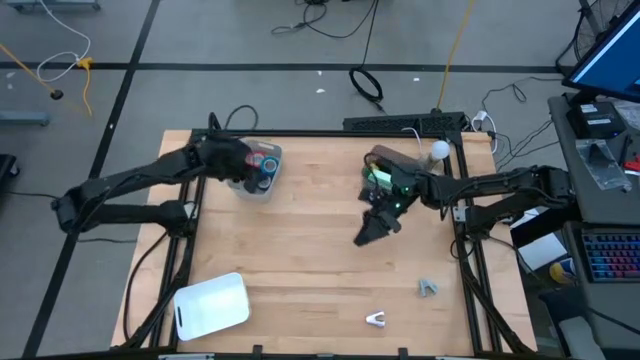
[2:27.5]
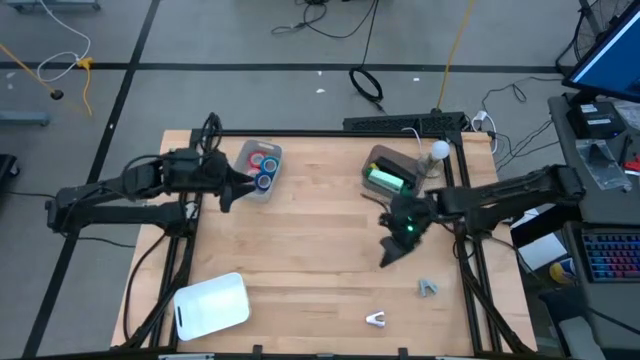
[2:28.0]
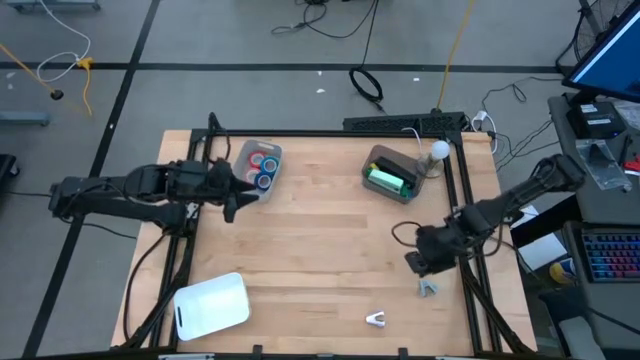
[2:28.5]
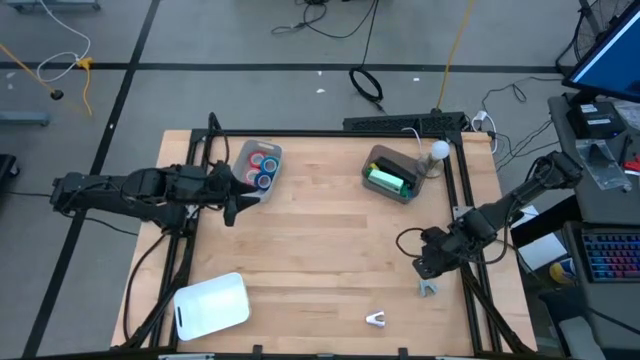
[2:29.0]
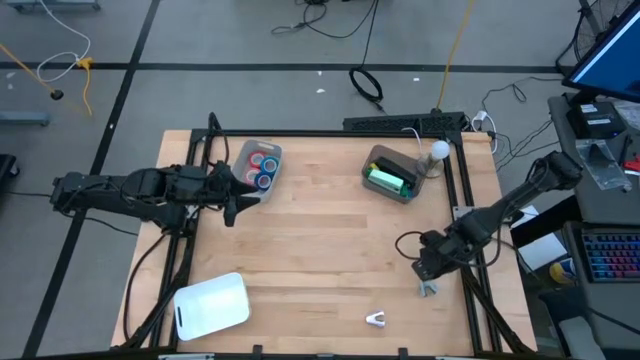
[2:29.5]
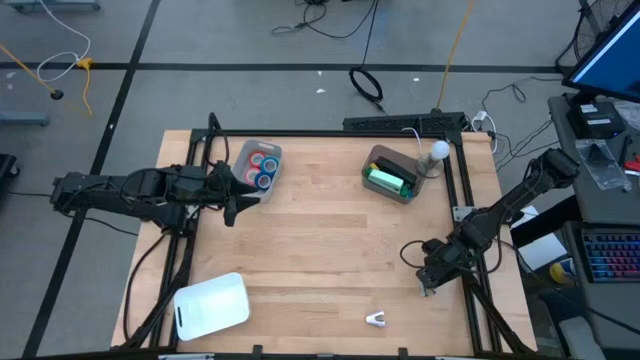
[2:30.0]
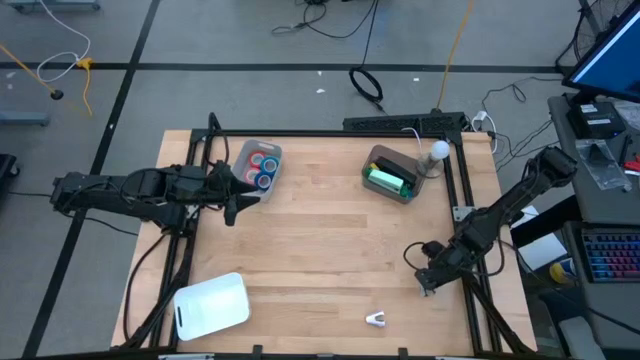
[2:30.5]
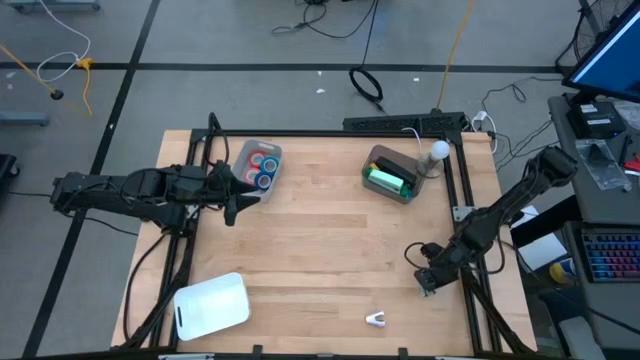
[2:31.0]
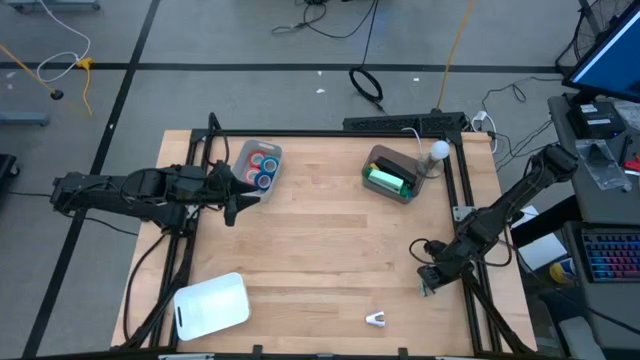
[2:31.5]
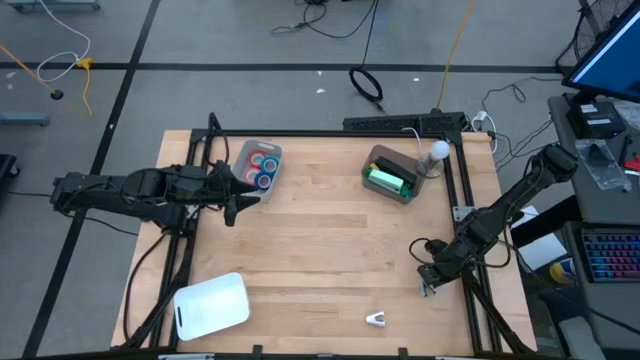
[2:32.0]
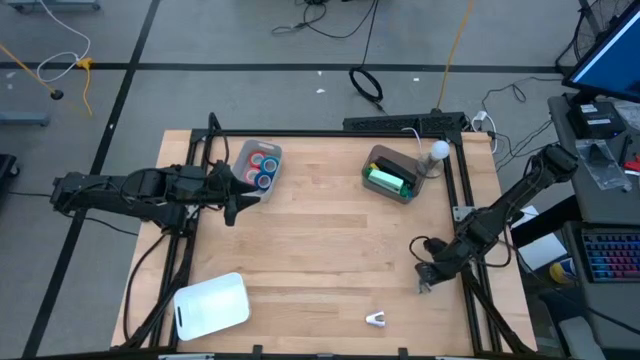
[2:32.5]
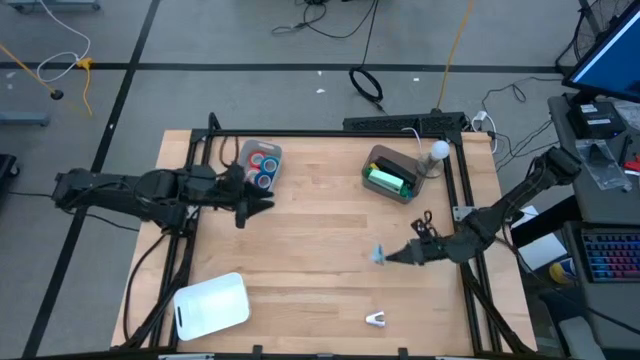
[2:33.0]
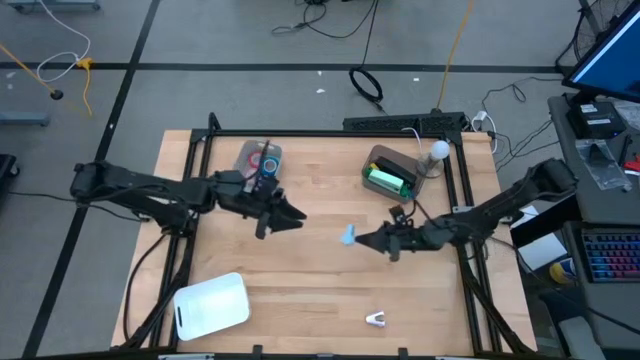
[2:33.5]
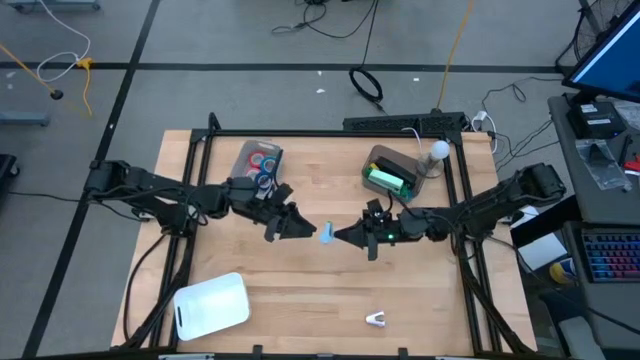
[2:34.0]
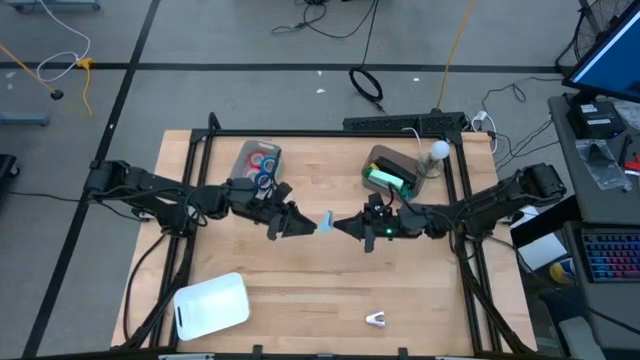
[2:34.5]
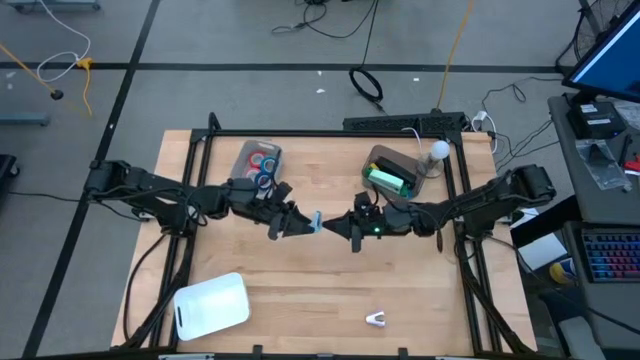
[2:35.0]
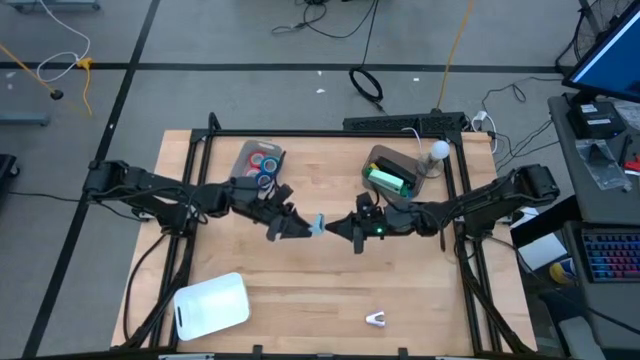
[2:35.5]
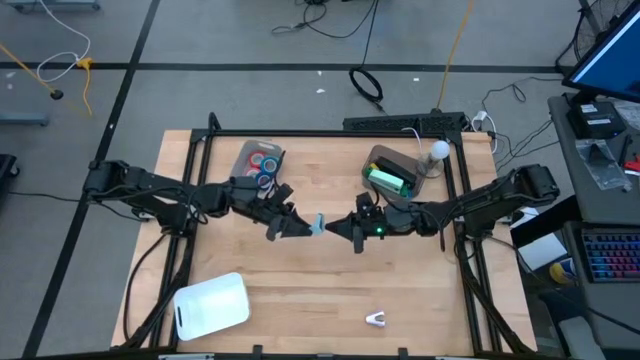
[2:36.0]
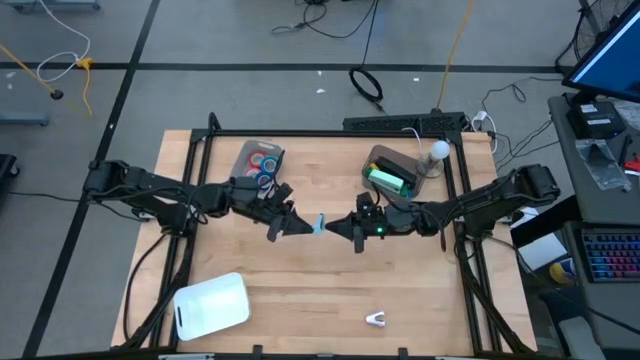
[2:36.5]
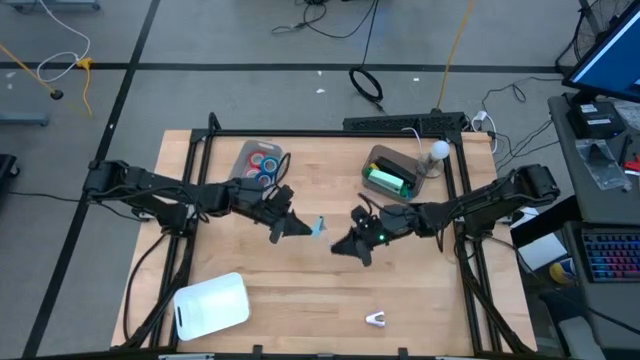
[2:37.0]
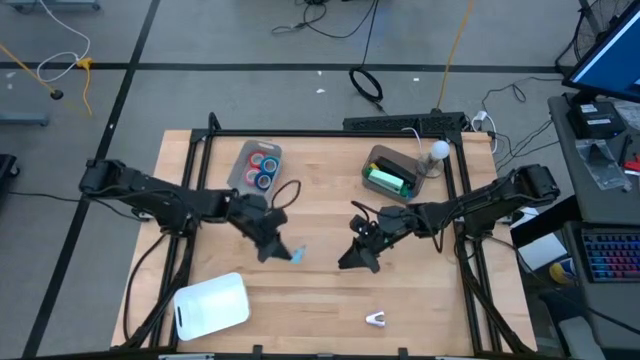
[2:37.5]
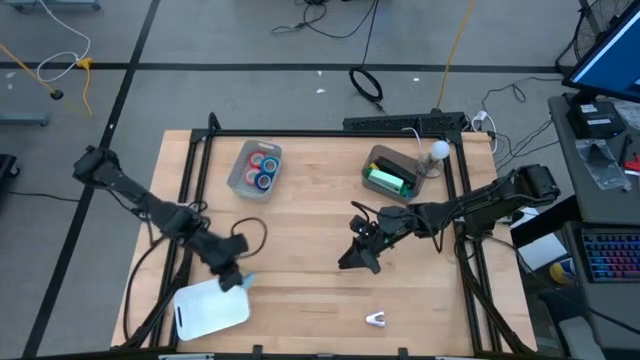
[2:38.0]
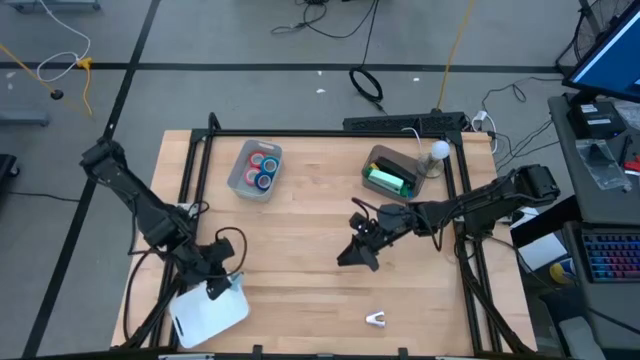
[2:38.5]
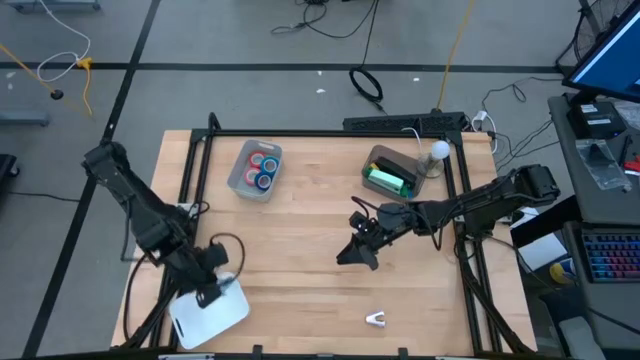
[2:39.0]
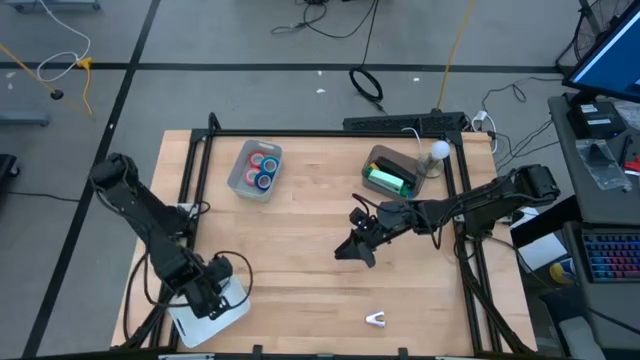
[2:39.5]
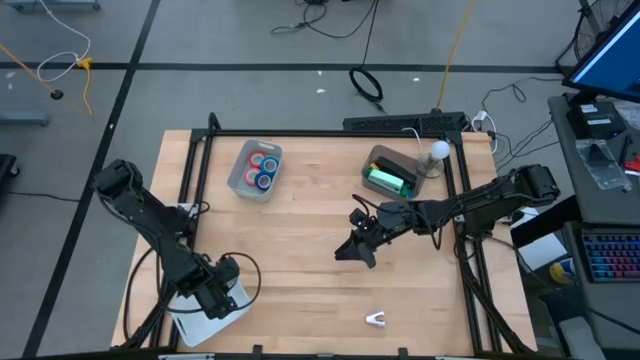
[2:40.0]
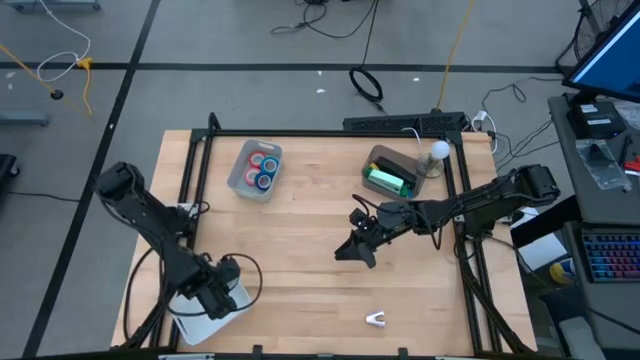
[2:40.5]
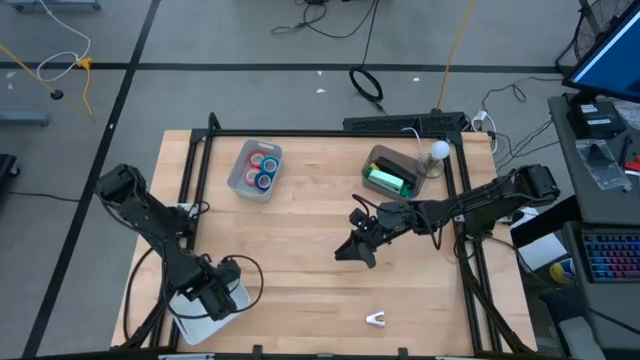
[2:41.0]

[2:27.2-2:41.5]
Task: Pick and place Stapler, Stapler remover, tape
Put the blue staple remover into the white bin

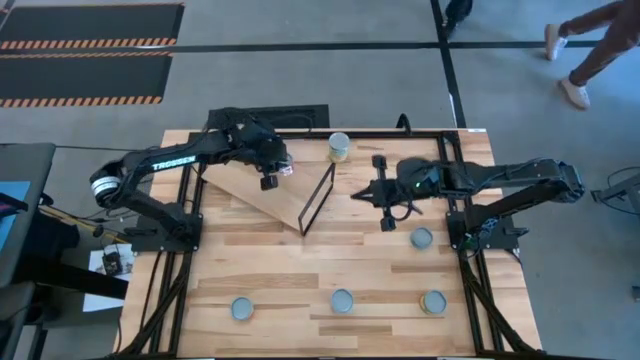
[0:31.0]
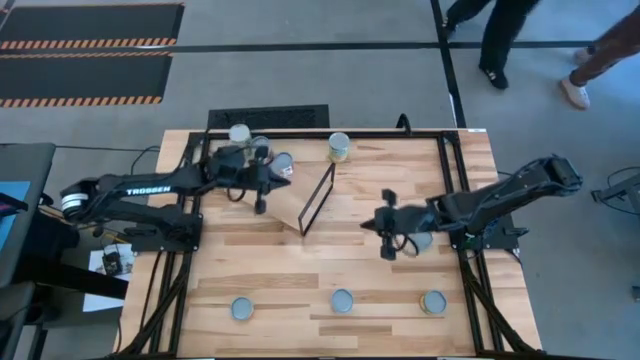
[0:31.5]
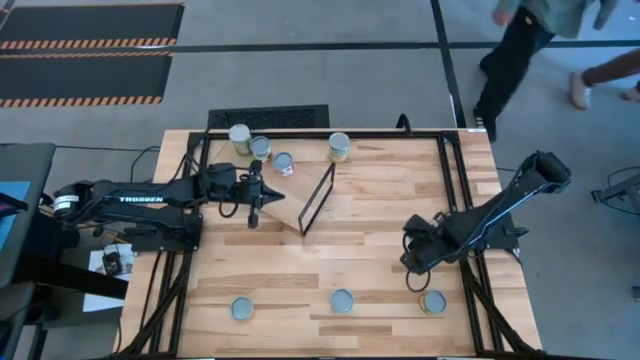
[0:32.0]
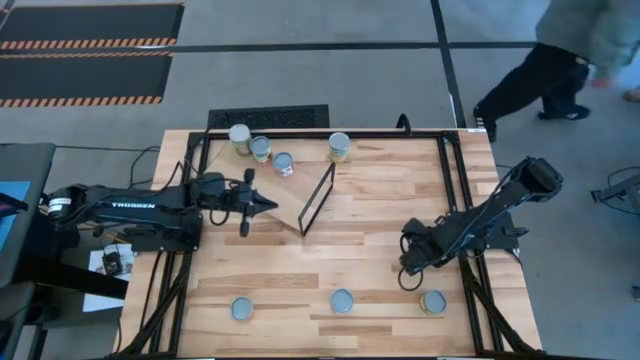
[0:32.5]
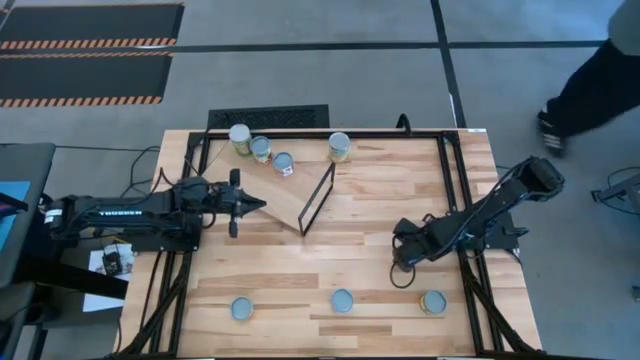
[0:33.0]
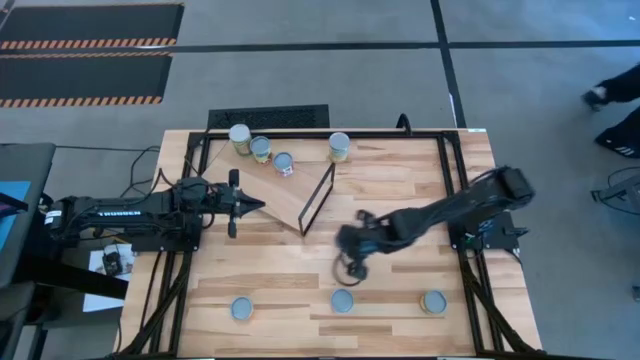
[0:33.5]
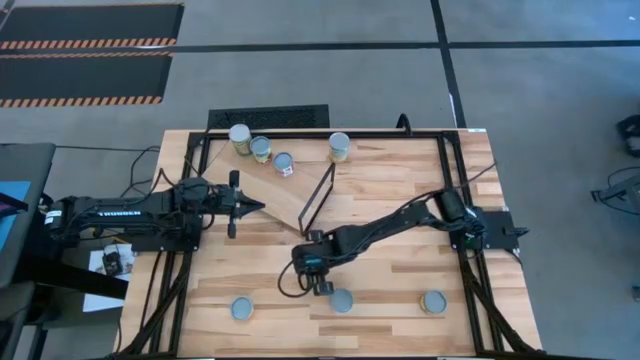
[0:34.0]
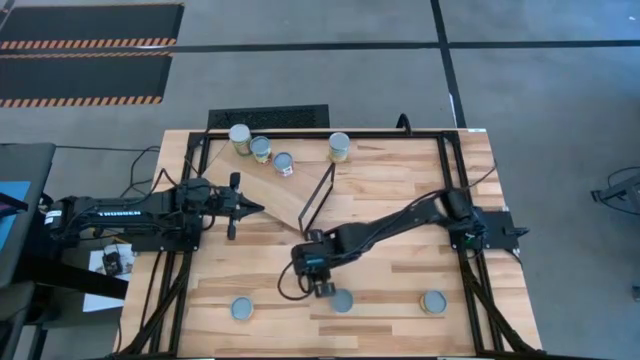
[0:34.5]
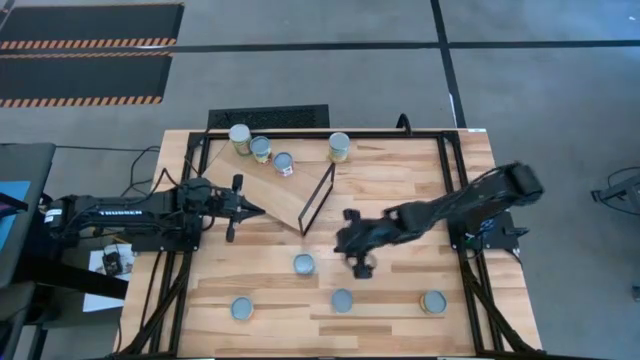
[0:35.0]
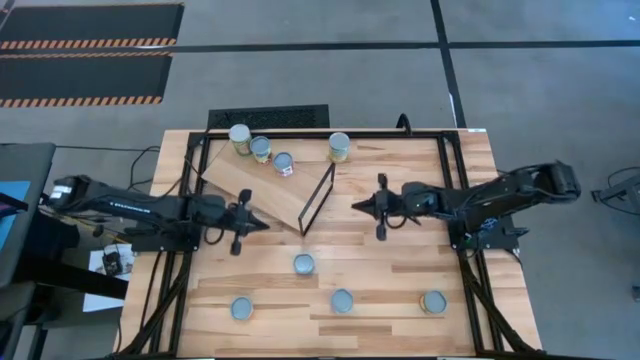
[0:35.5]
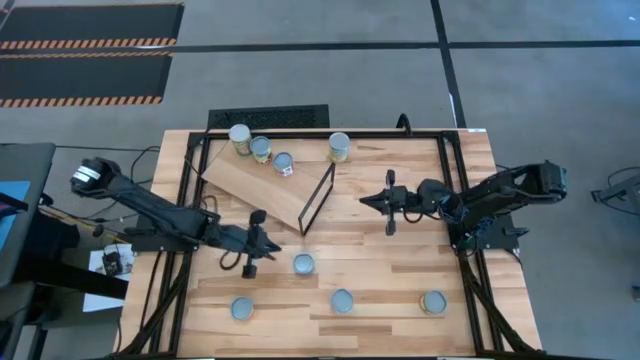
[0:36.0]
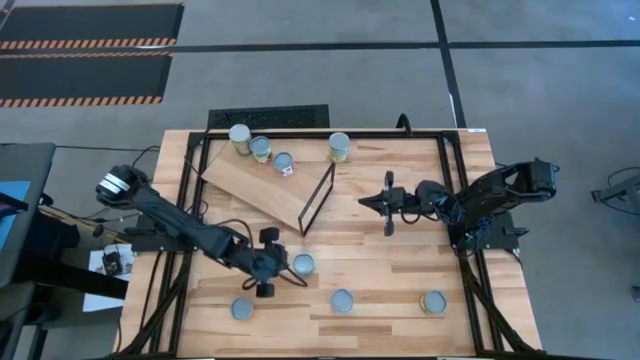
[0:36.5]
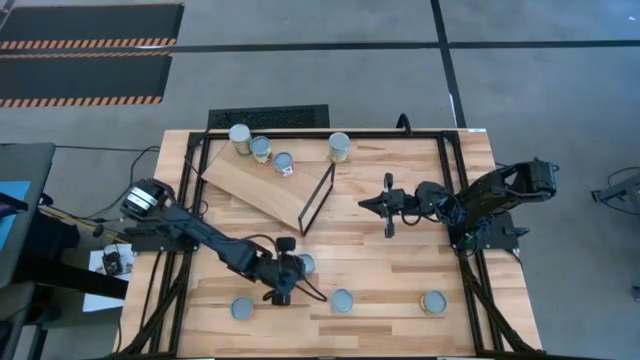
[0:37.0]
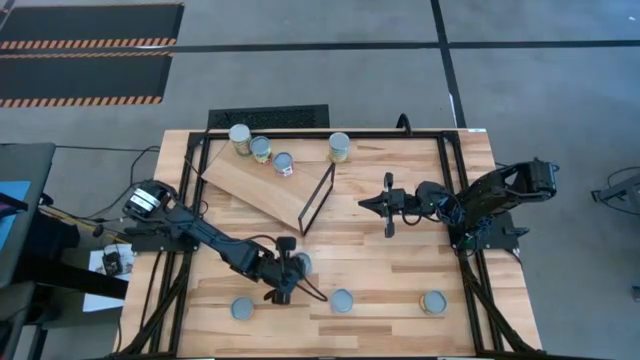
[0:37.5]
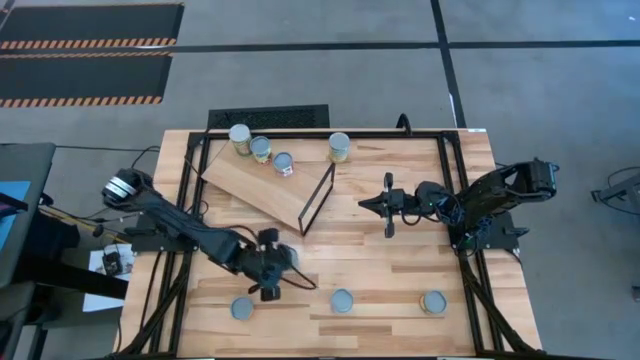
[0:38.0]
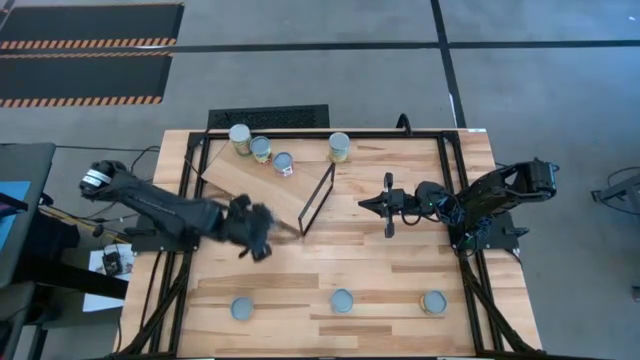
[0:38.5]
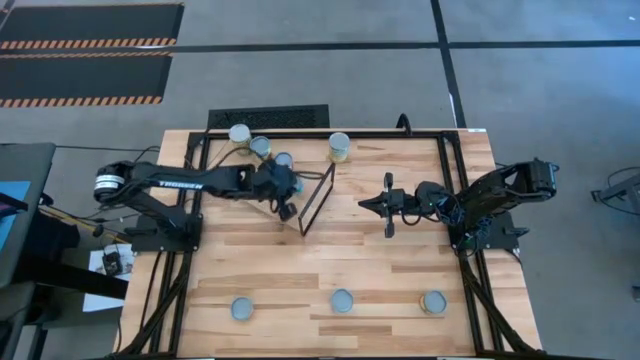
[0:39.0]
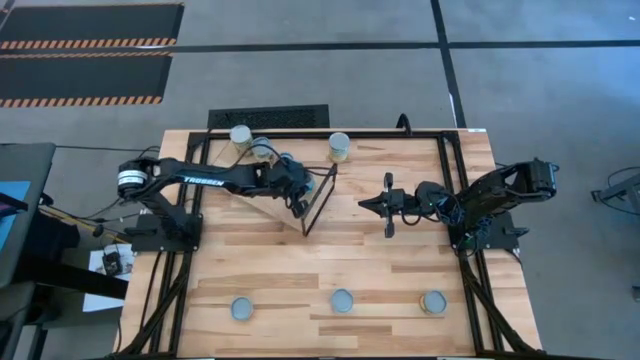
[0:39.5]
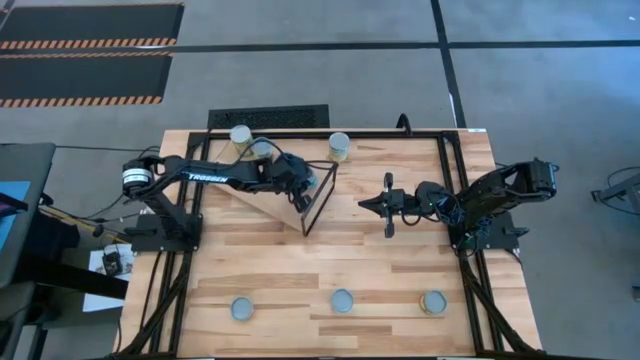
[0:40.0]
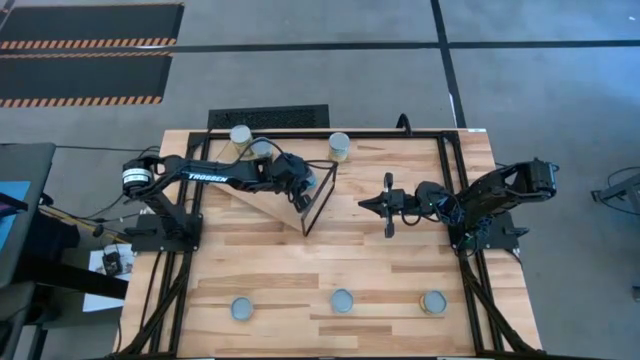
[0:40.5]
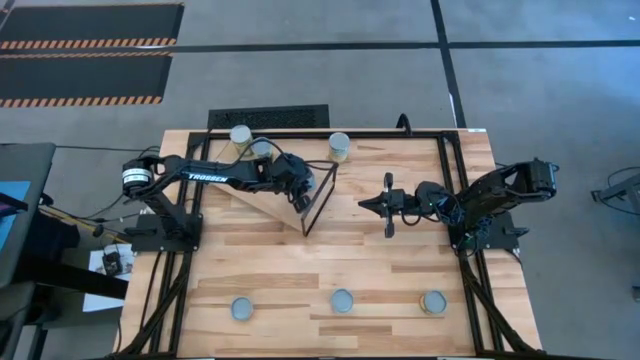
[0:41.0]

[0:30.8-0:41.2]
Task: Pick and place cans onto a shelf
Put the canned tuna on the shelf
